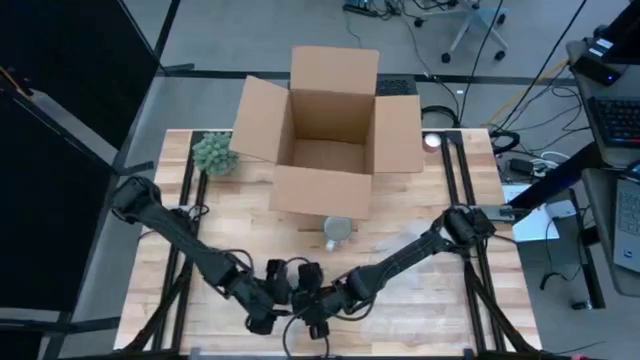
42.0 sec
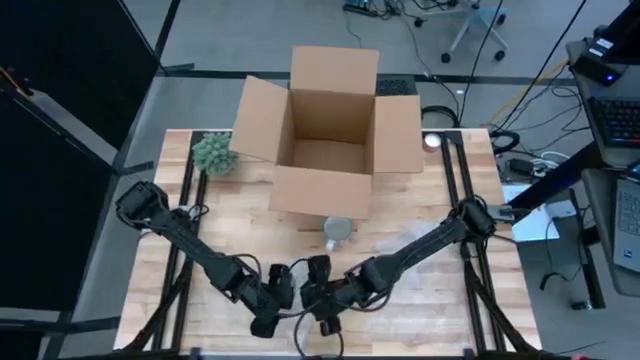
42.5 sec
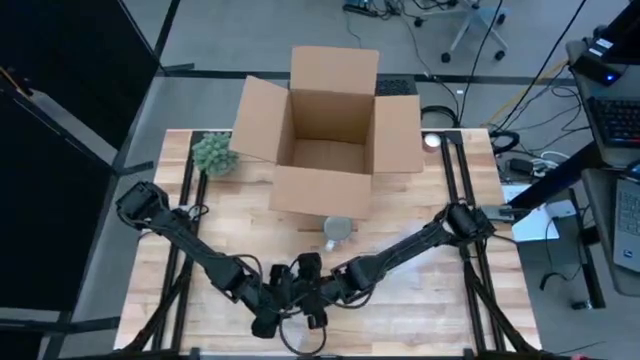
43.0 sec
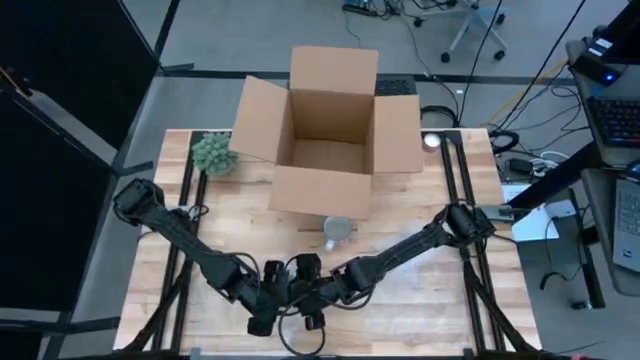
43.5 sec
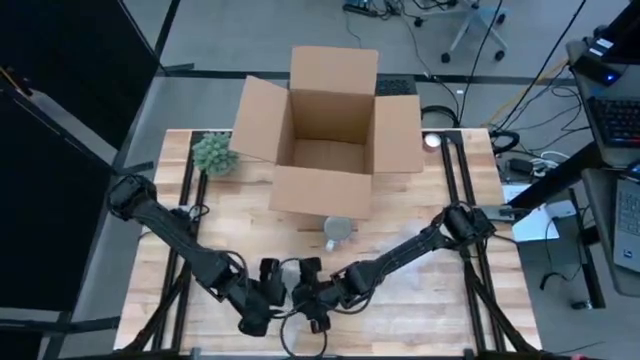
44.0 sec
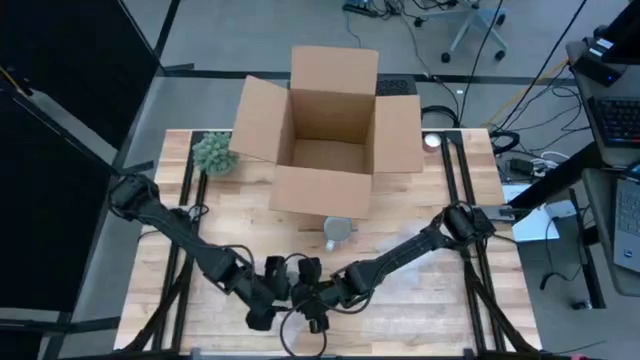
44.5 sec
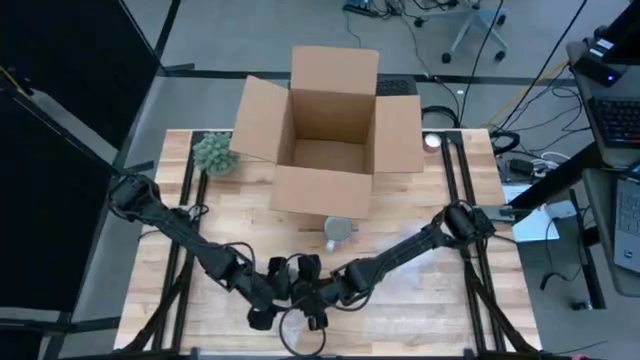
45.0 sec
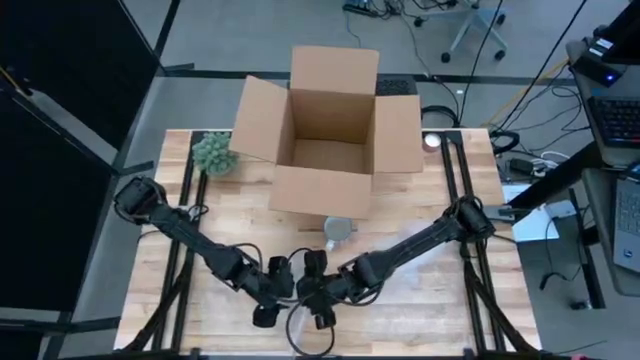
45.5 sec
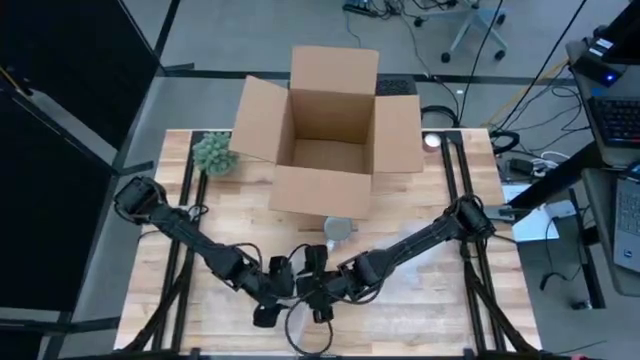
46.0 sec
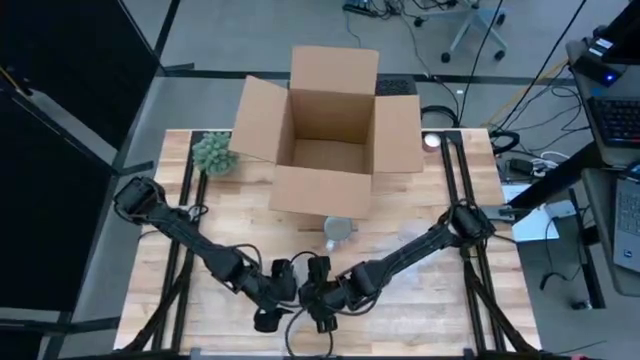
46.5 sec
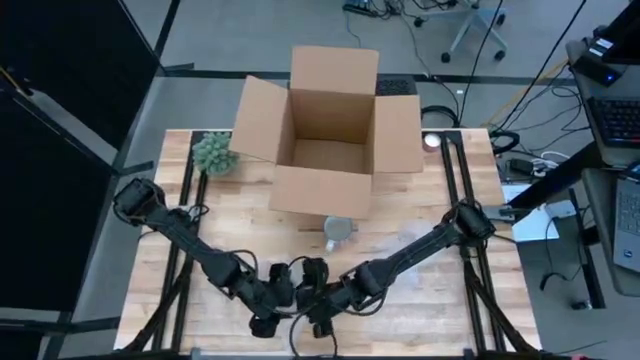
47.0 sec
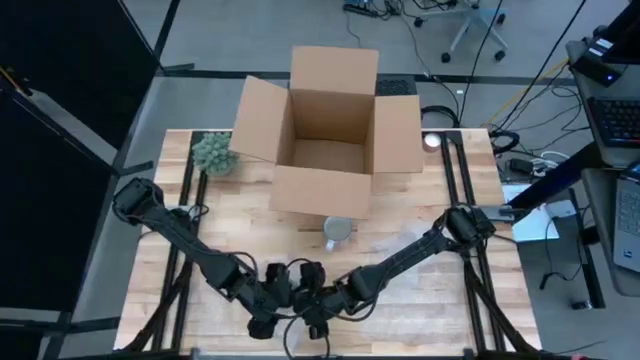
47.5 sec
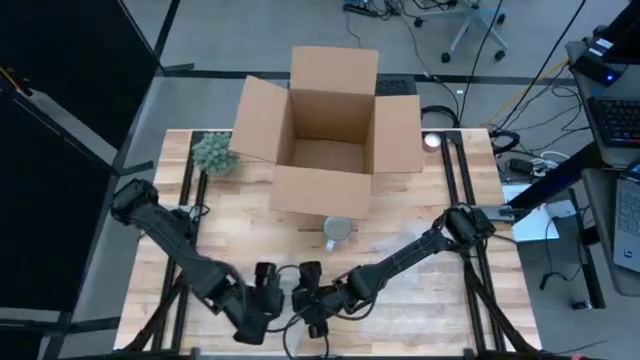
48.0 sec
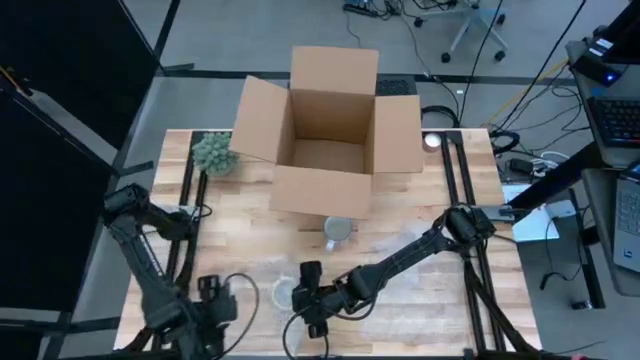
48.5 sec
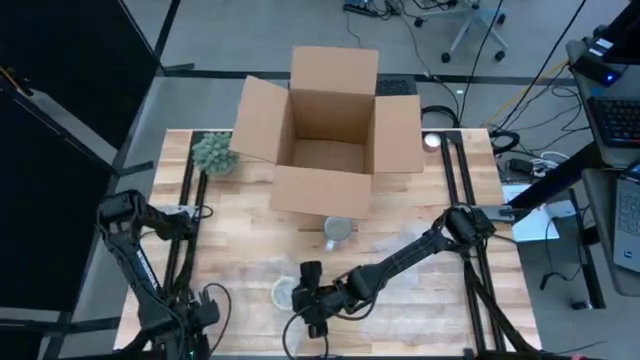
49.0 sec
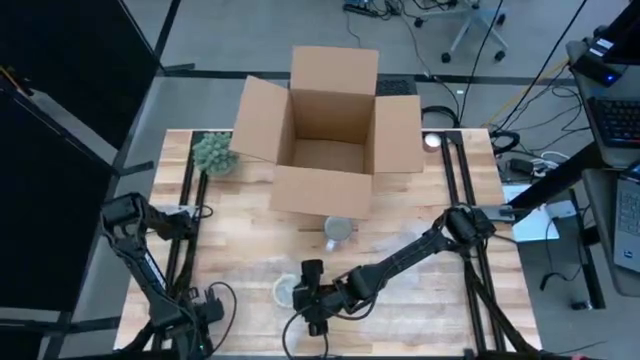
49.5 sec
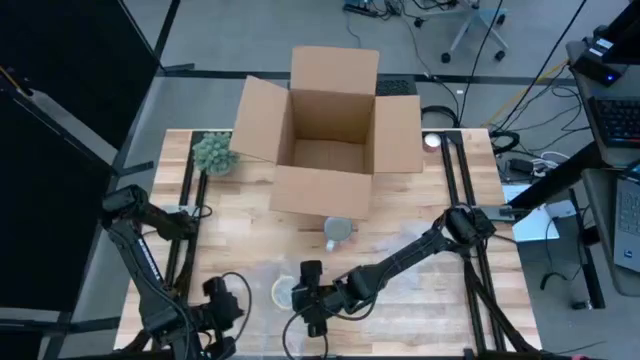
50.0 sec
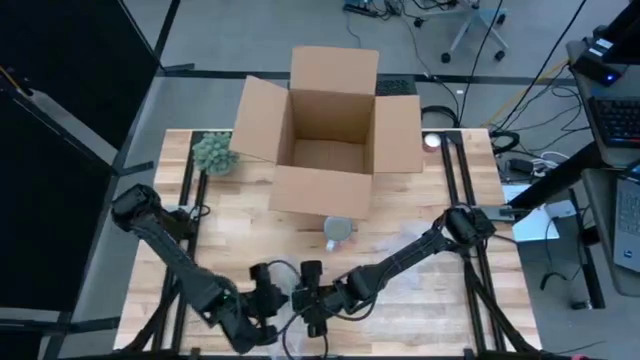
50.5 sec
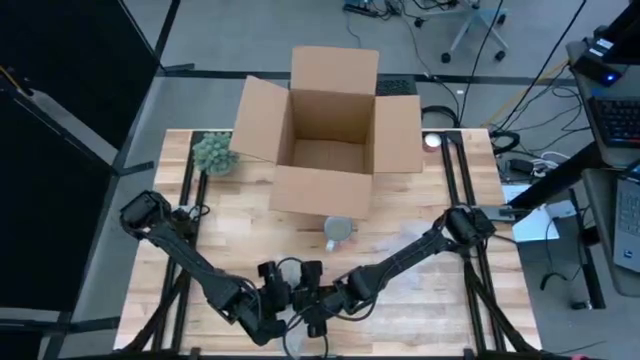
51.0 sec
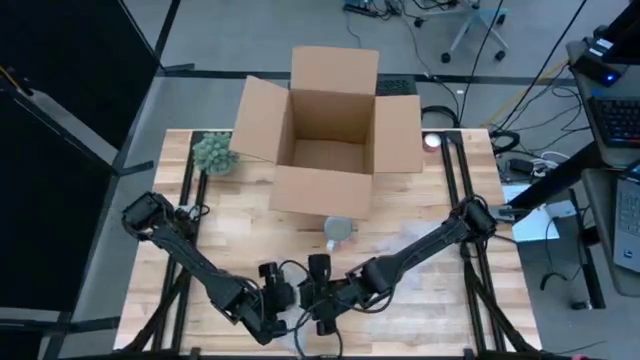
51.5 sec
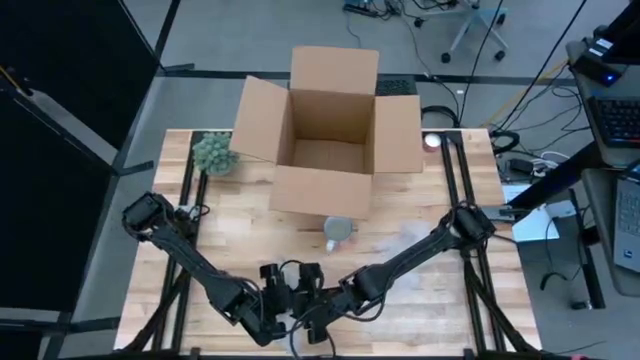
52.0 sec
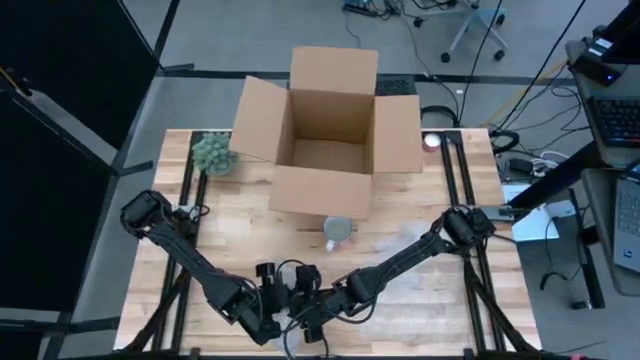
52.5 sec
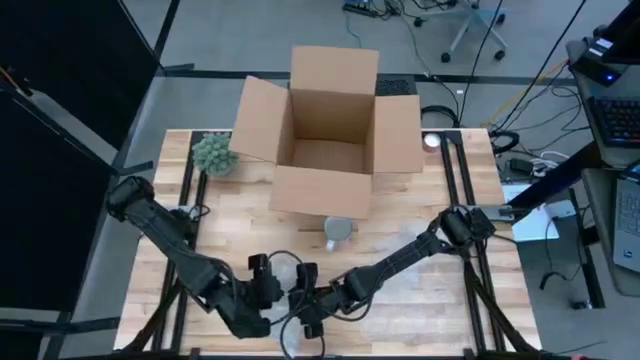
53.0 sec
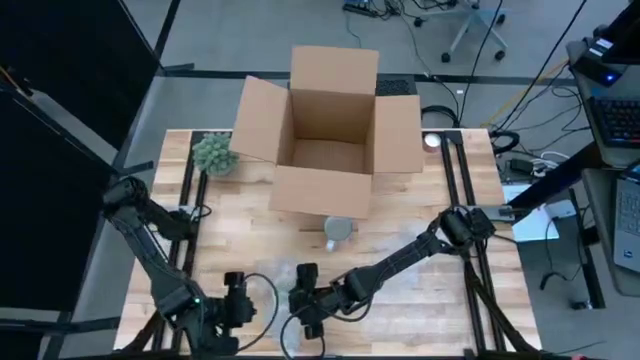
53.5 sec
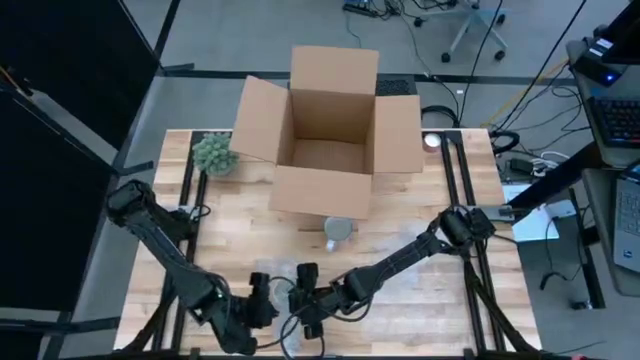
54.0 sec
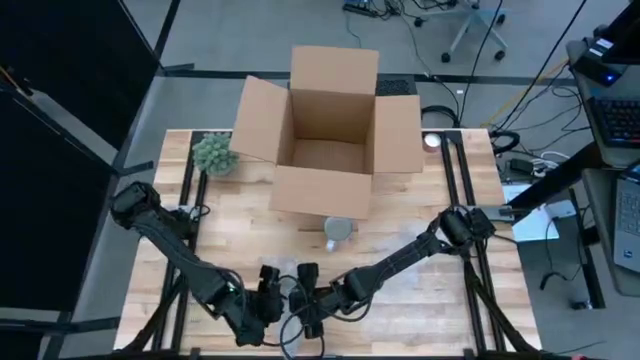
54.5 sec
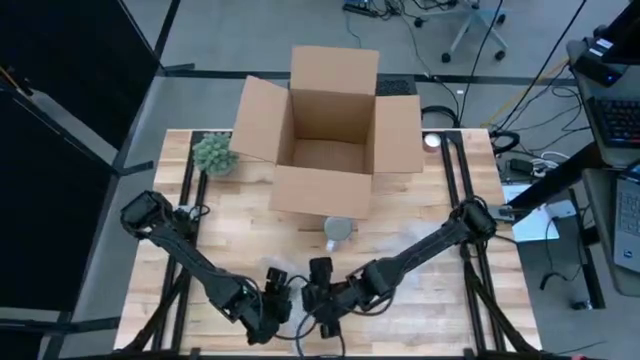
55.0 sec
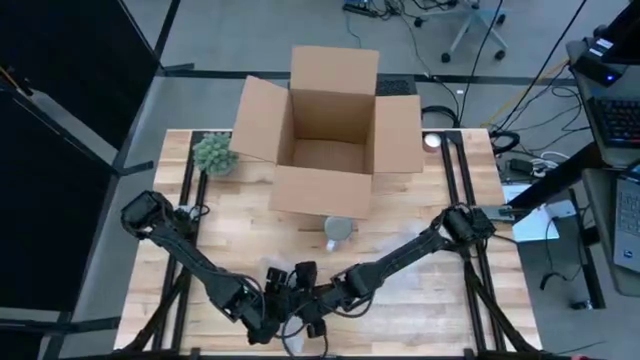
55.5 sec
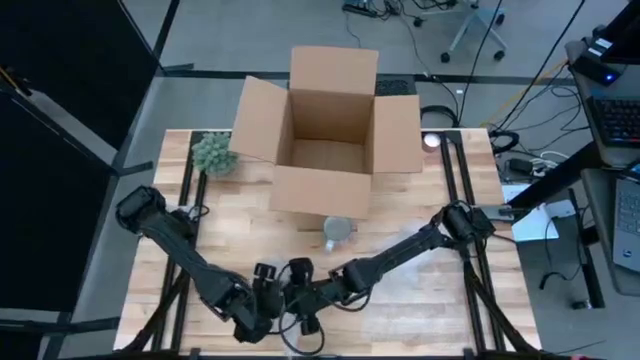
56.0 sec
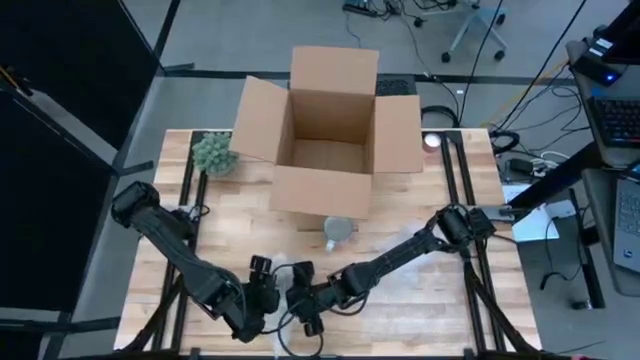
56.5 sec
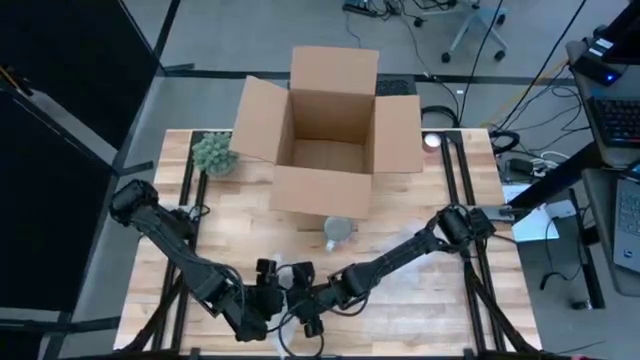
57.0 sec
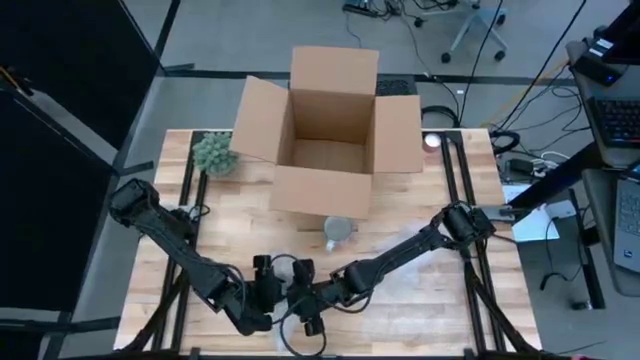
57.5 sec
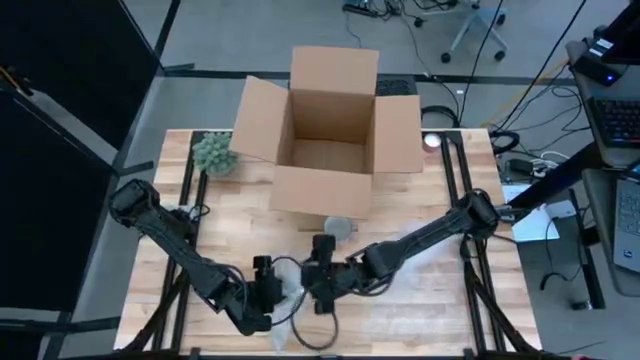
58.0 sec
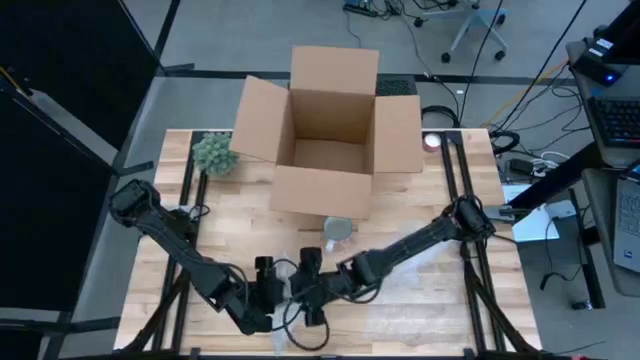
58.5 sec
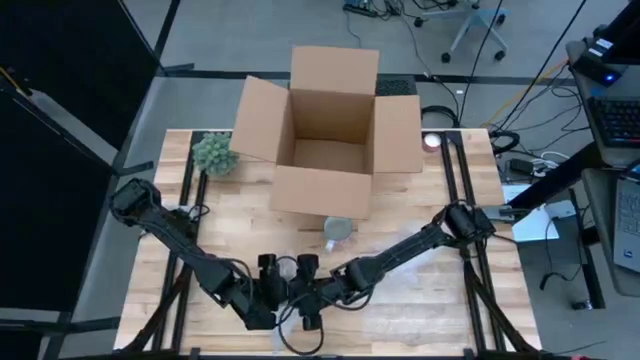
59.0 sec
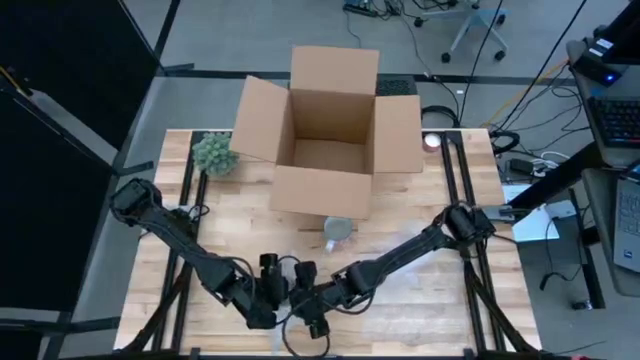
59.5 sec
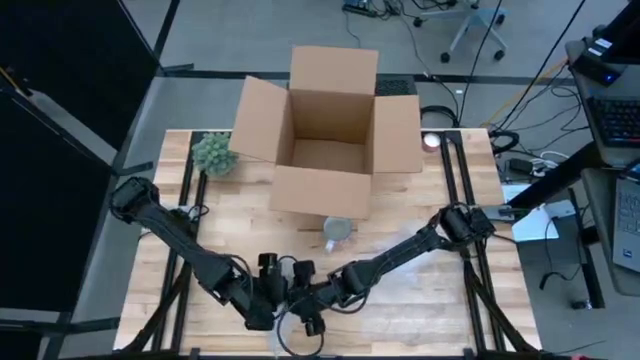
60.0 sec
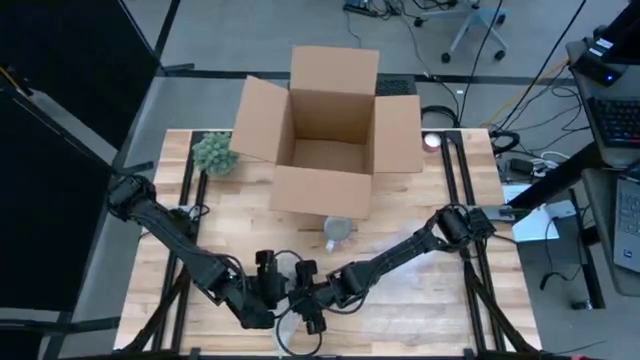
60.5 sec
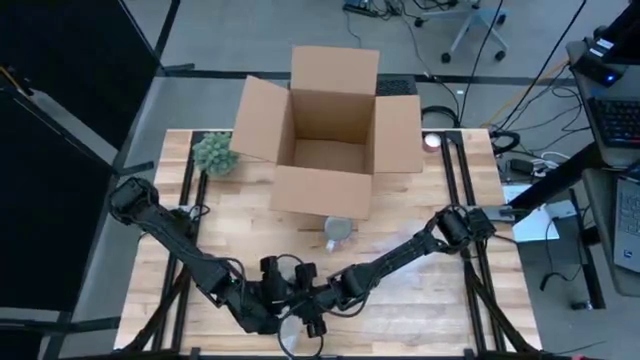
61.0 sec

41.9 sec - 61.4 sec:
Task: wrap mug
Wrap the orange mug with bubble wrap
